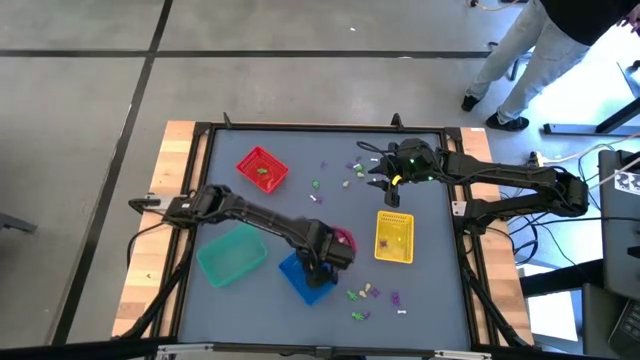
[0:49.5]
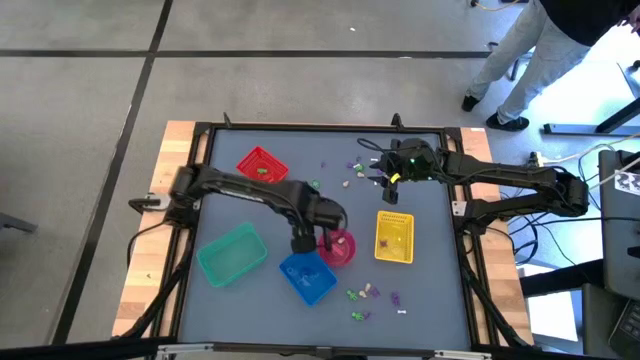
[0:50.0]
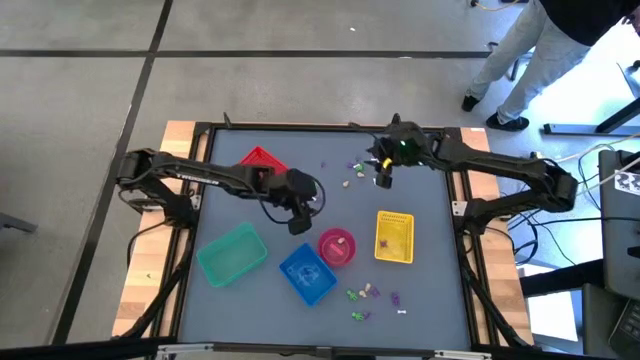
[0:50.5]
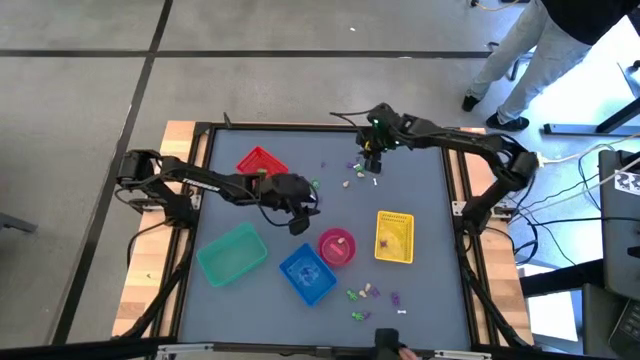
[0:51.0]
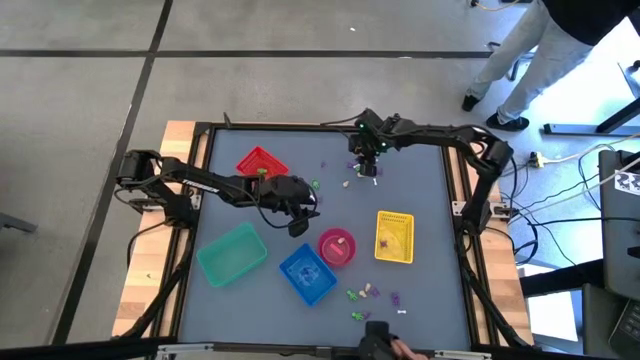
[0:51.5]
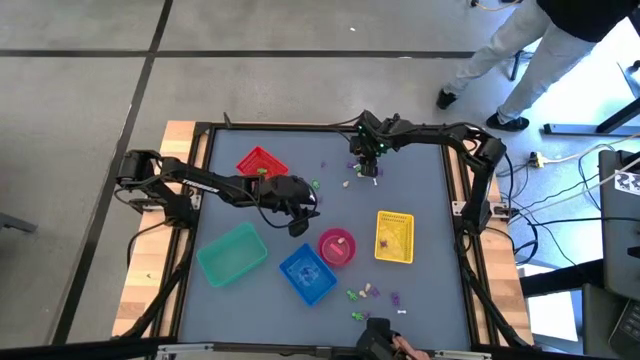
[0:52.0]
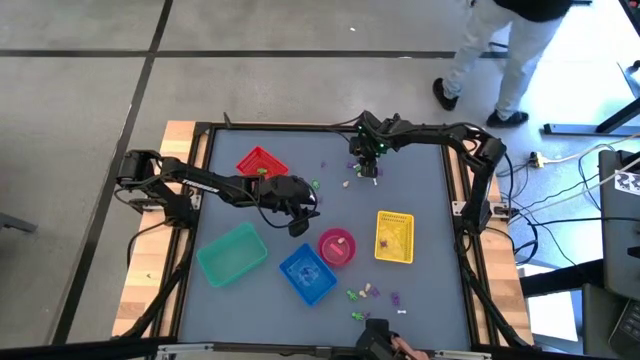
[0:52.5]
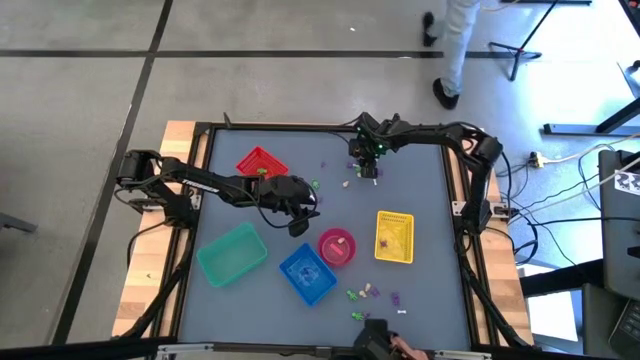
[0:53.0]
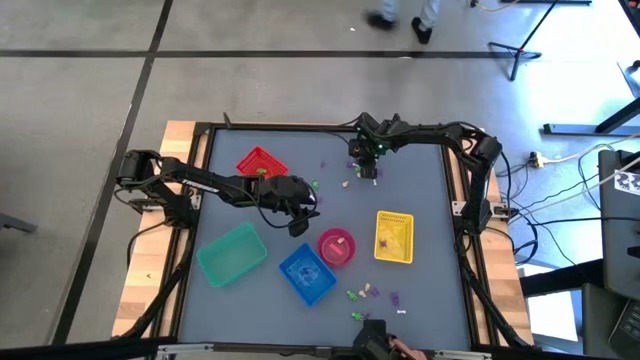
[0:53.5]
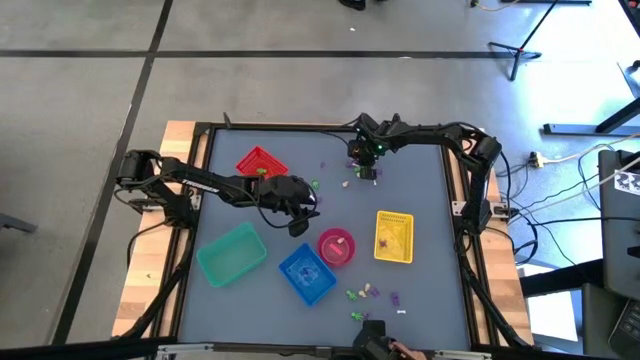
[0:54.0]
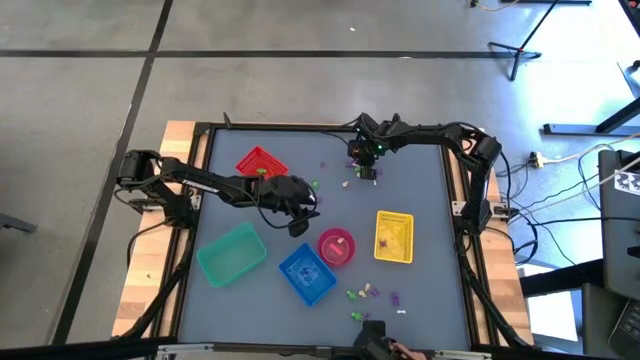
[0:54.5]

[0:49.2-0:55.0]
Task: Sort Halloween decoration
Put the violet witch hat toy into the blue bin

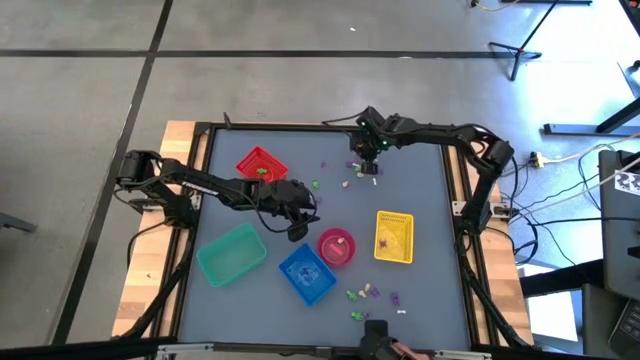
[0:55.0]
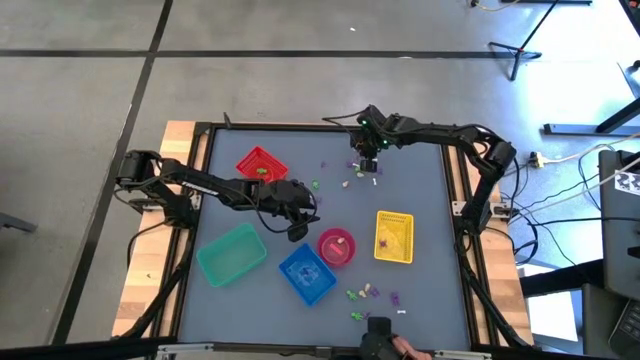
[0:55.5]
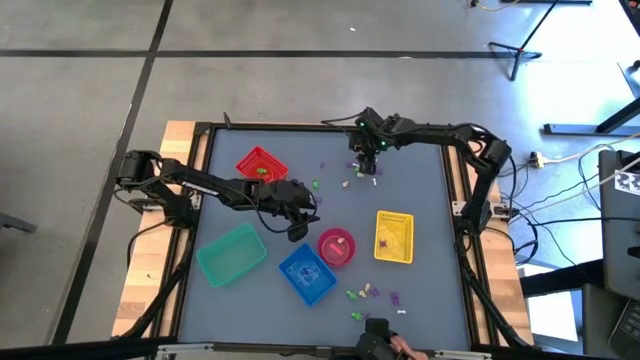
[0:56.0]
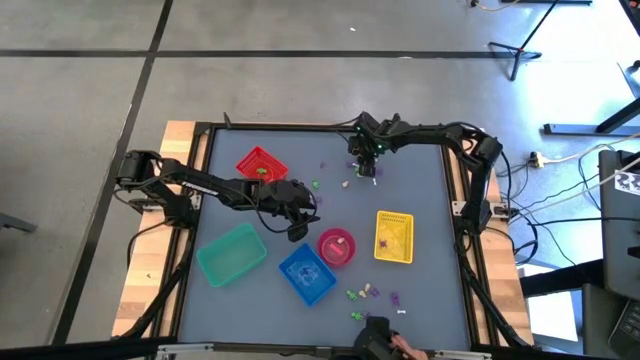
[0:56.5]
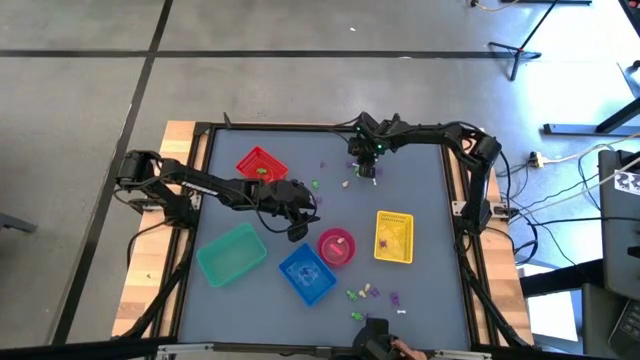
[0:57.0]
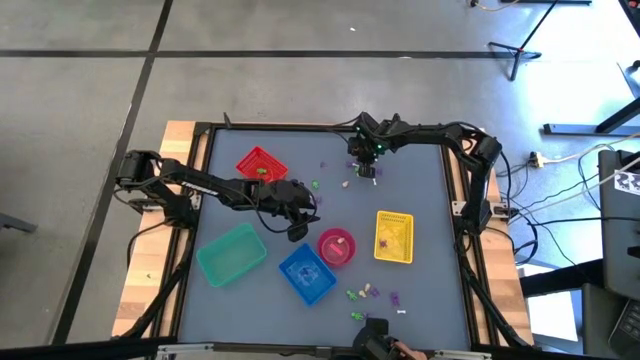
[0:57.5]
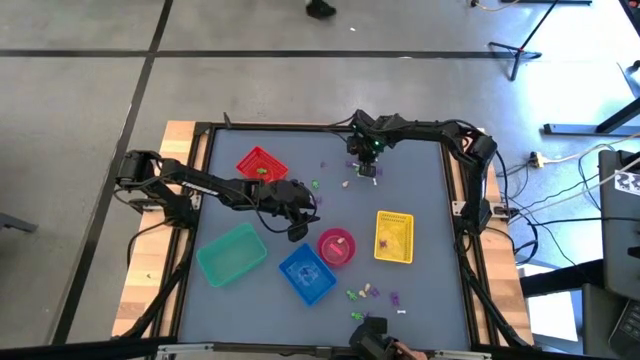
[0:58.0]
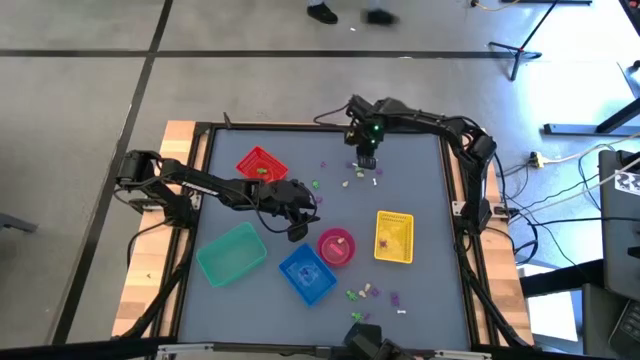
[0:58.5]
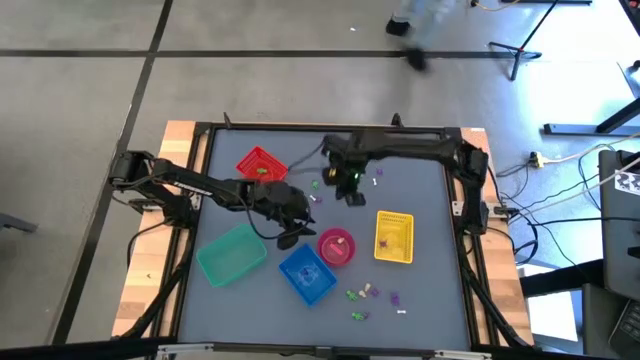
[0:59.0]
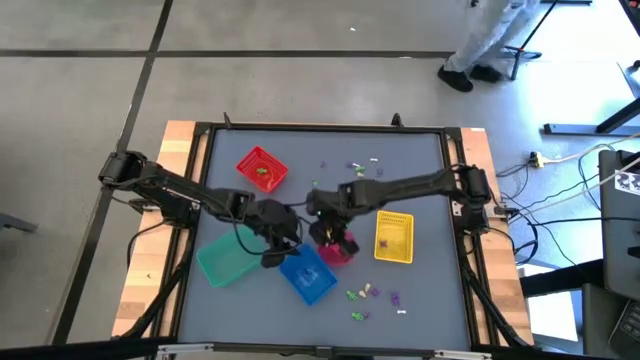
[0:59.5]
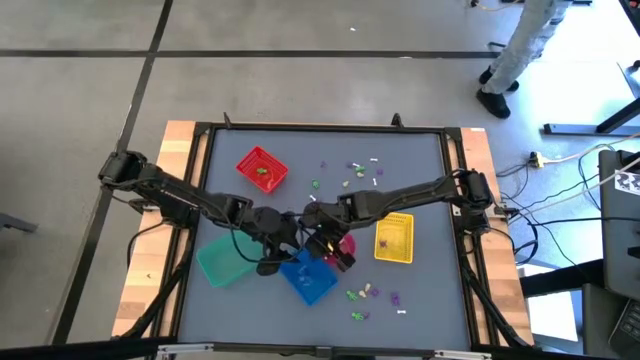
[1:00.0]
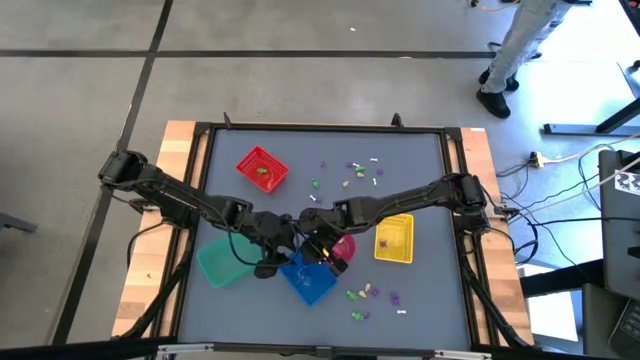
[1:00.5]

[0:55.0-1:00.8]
Put the violet witch hat toy into the blue bin

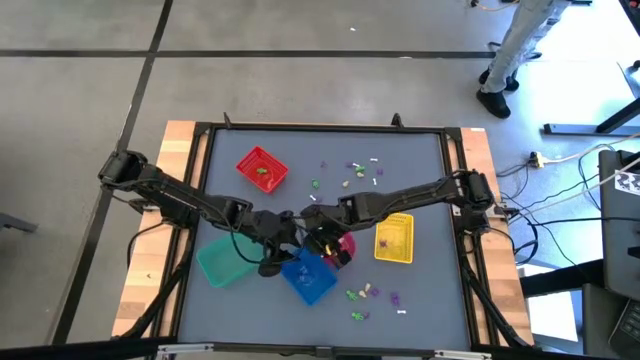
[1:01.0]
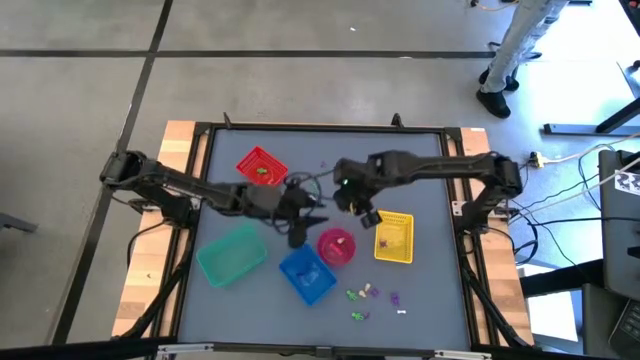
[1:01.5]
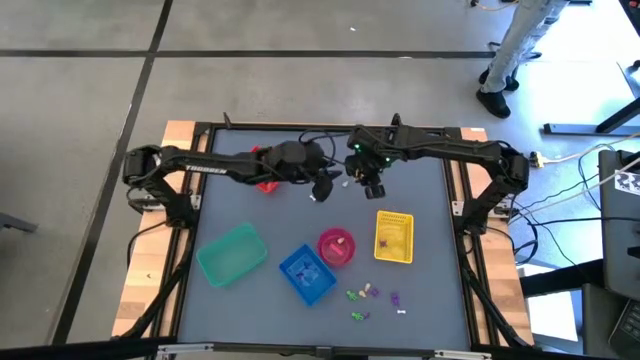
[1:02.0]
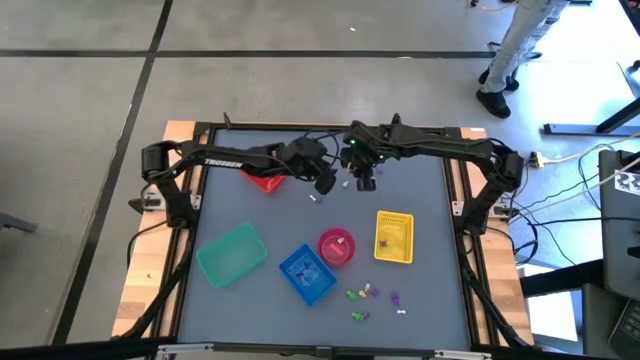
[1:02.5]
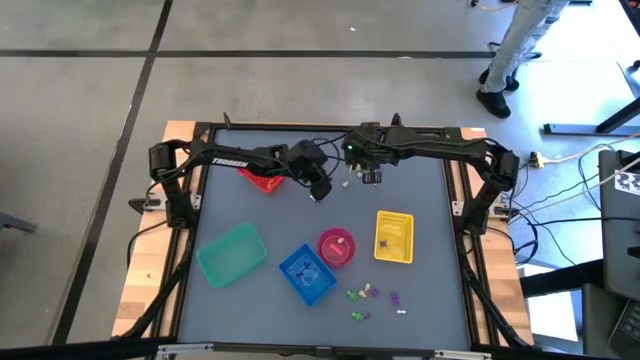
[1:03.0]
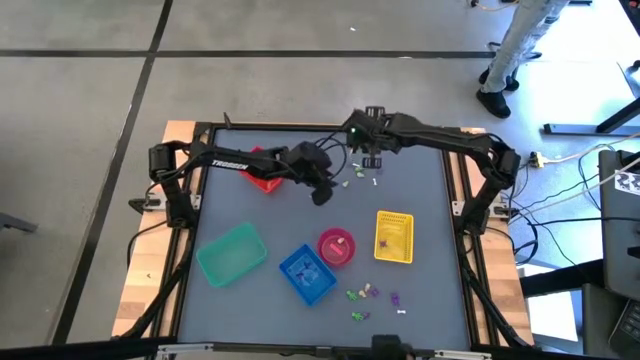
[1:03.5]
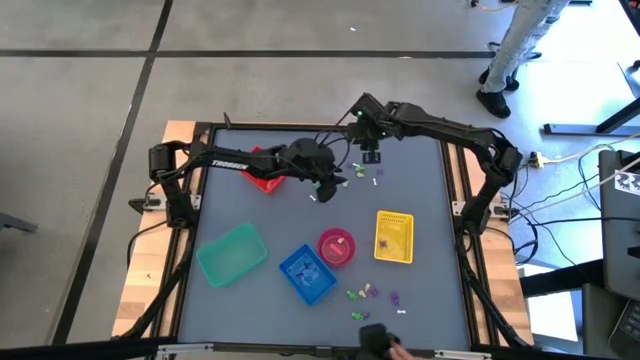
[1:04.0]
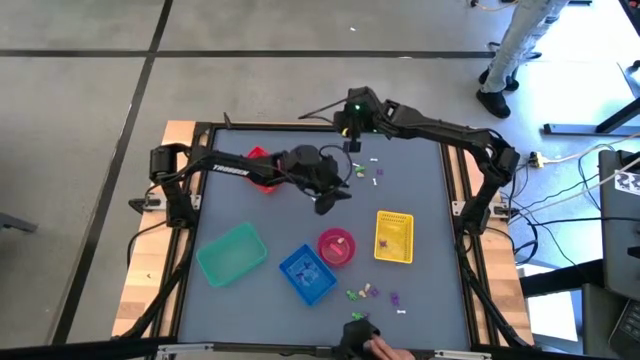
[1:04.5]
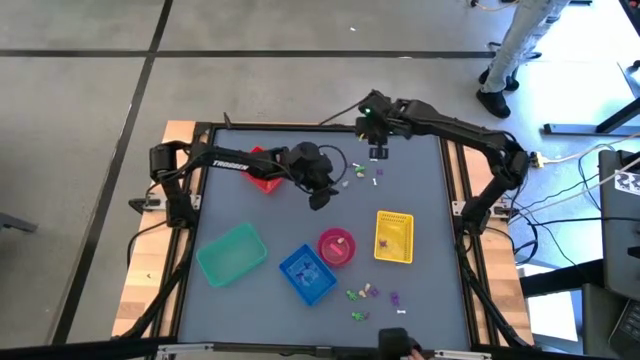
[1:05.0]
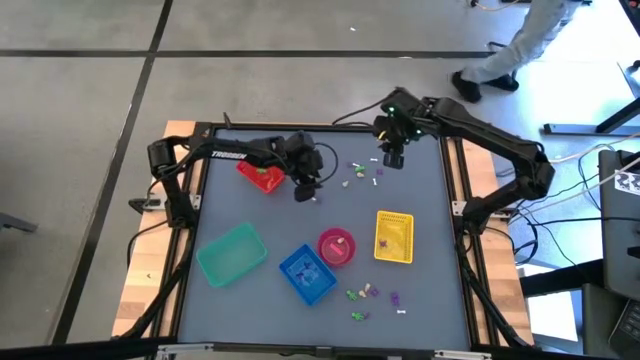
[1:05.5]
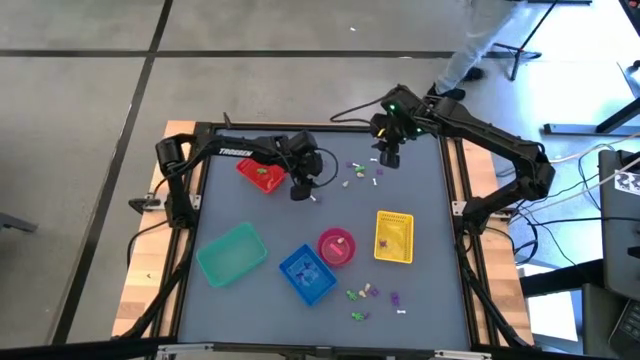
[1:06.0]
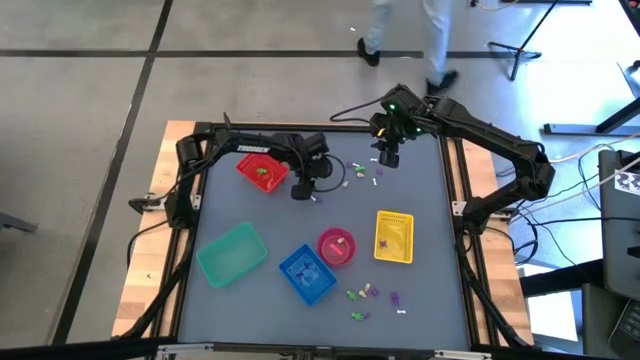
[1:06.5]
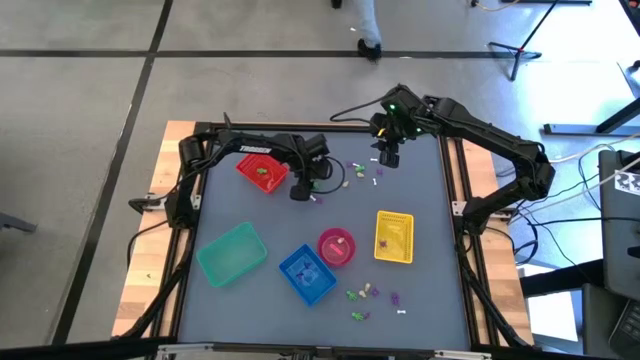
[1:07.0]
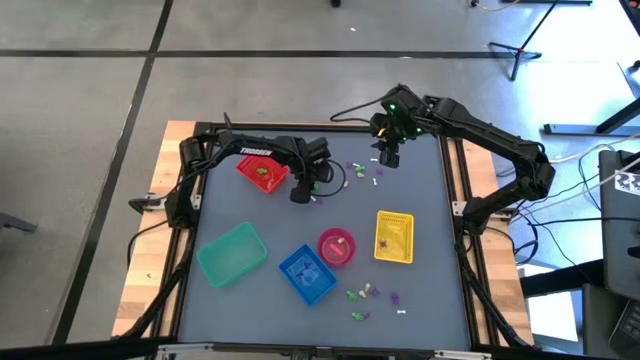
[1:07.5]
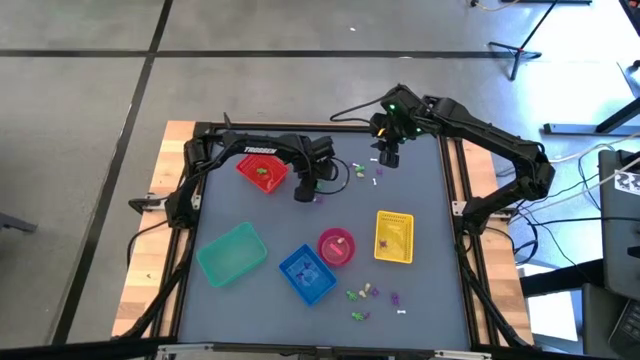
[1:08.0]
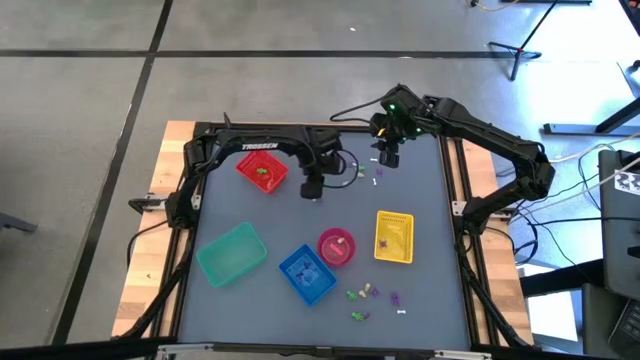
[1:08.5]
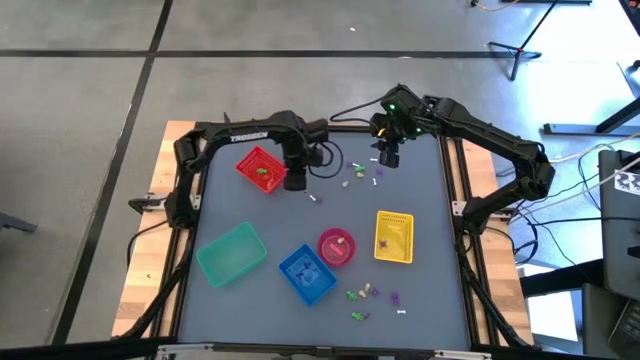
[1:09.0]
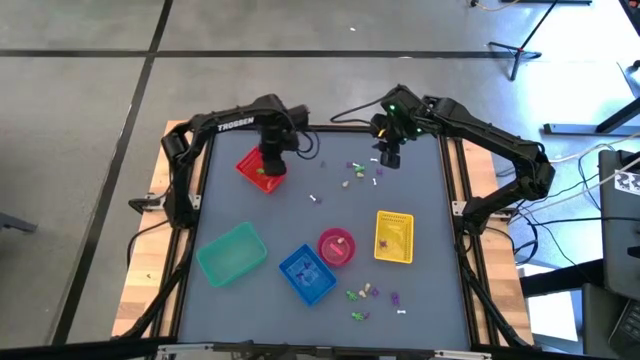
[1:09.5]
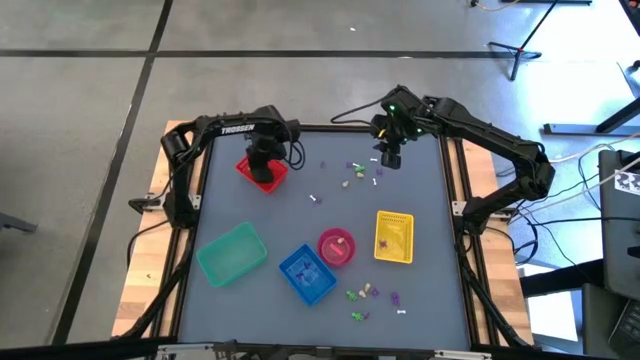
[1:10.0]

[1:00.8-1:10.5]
Put the green skeleton toy into the red bin

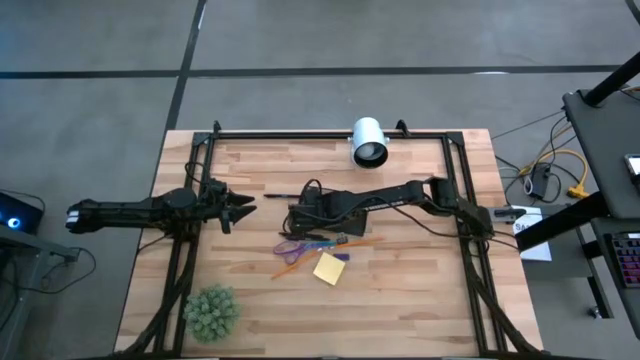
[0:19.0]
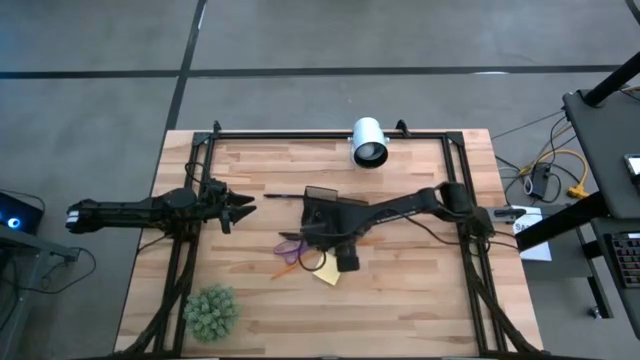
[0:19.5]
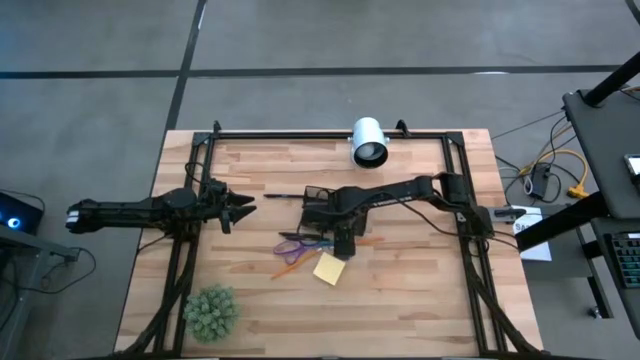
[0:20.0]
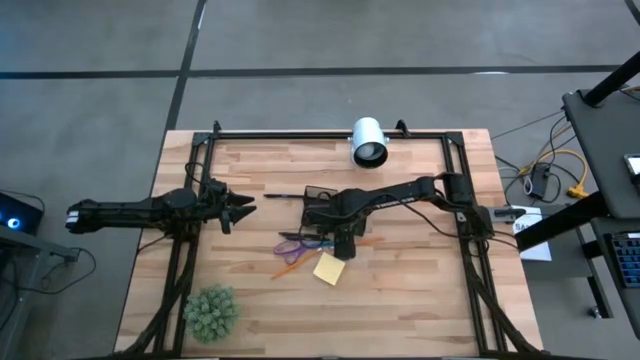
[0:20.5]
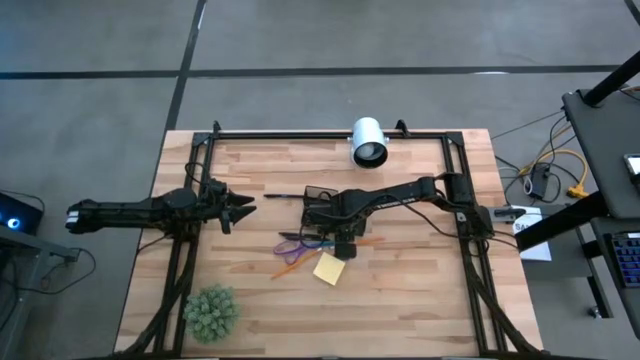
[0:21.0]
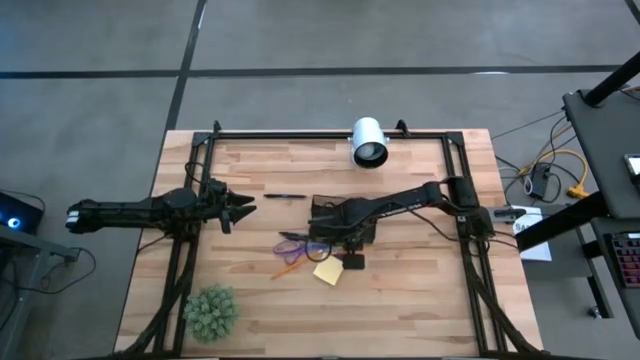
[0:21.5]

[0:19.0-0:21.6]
Task: Pick and place office supplies into organizer
Put the black binder clip into the black mesh organizer
